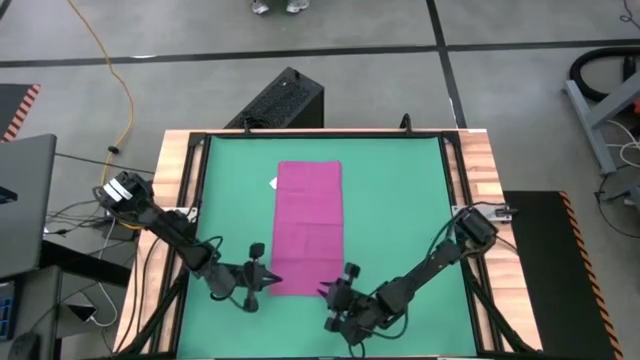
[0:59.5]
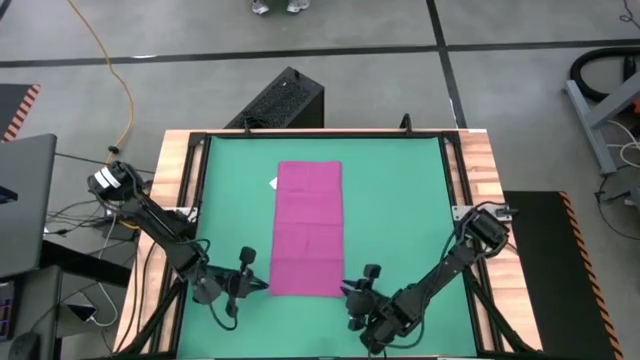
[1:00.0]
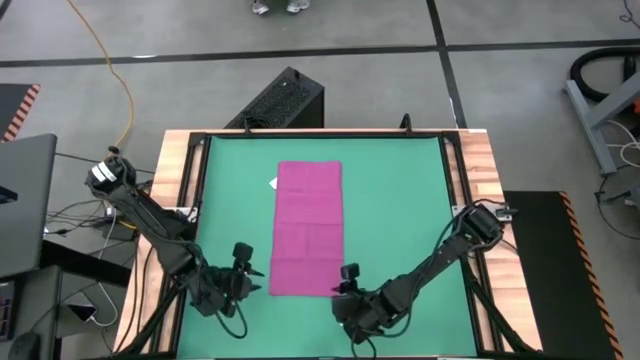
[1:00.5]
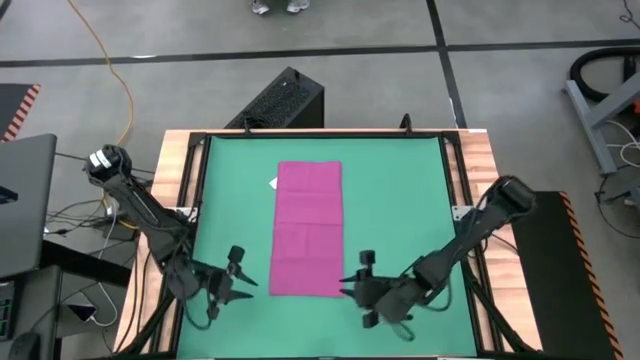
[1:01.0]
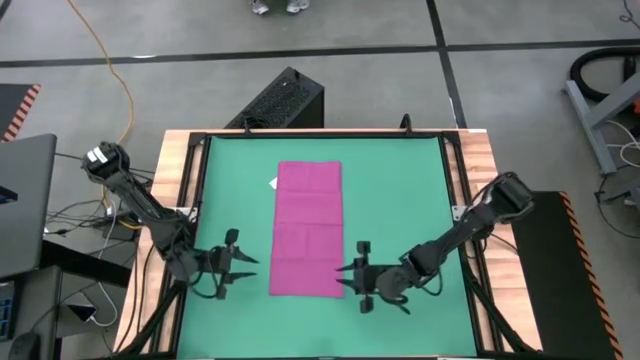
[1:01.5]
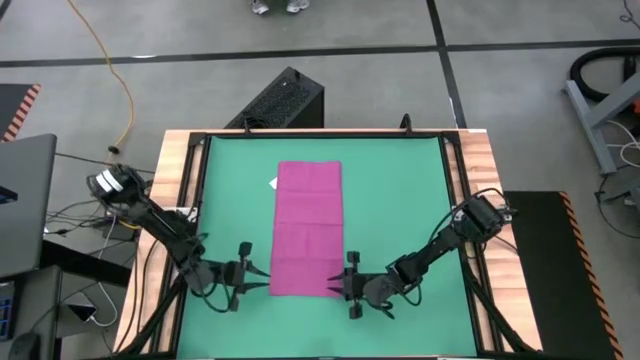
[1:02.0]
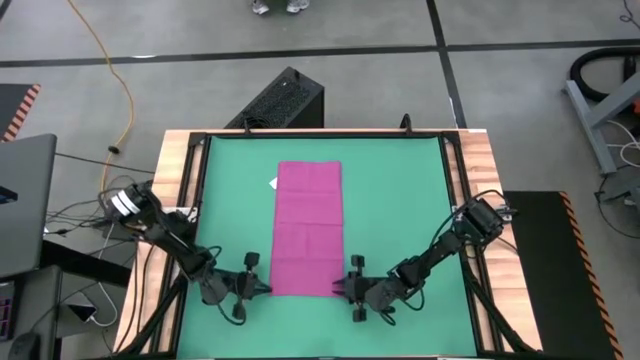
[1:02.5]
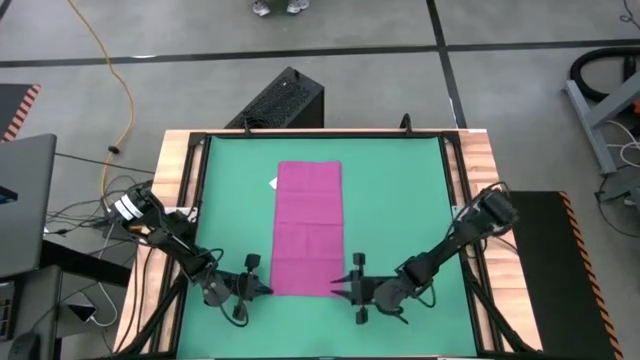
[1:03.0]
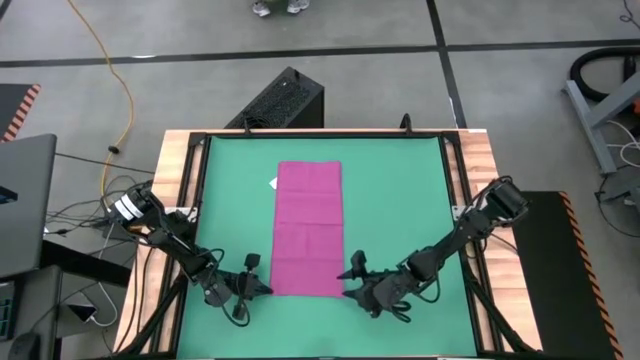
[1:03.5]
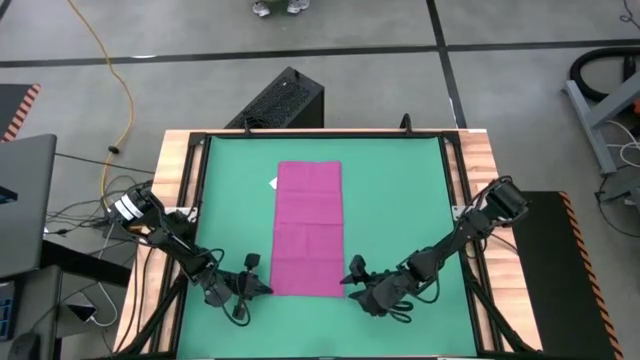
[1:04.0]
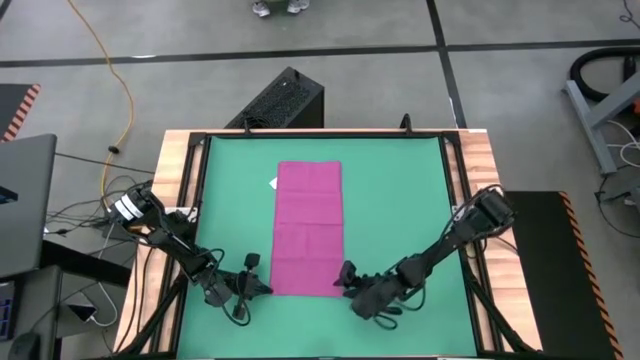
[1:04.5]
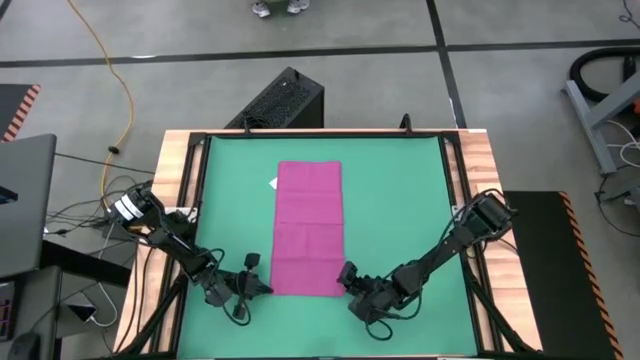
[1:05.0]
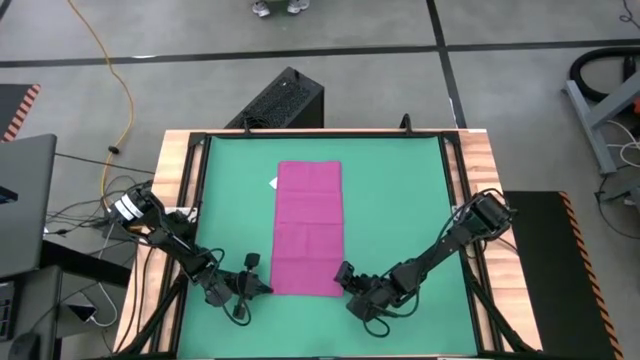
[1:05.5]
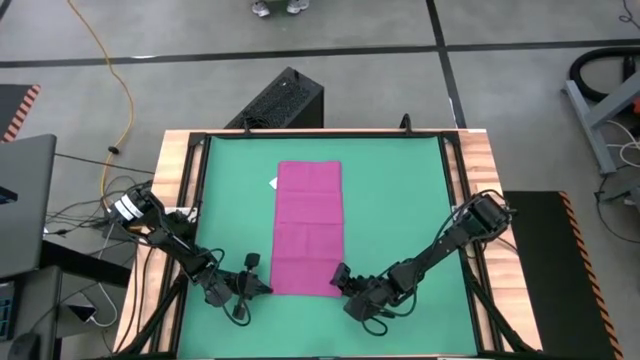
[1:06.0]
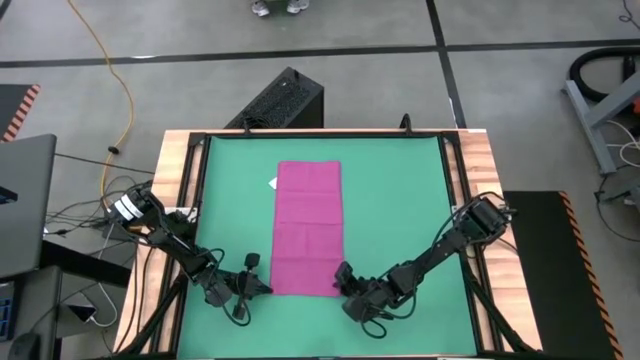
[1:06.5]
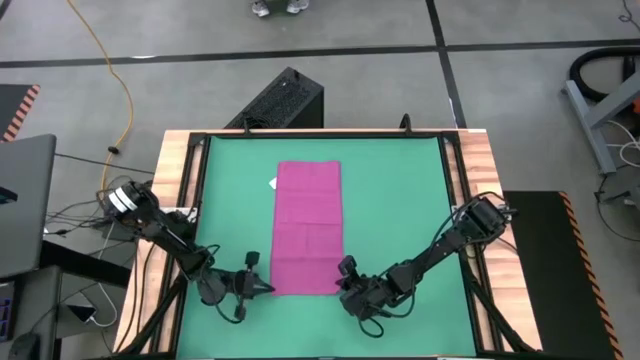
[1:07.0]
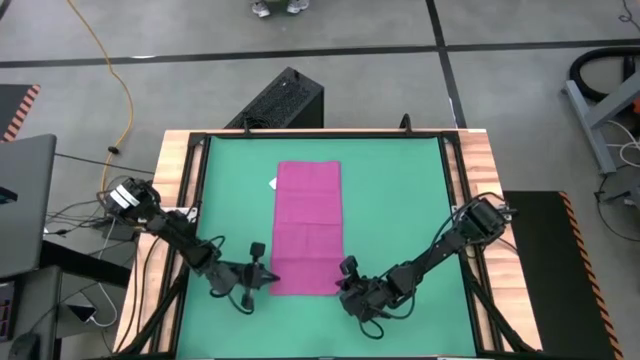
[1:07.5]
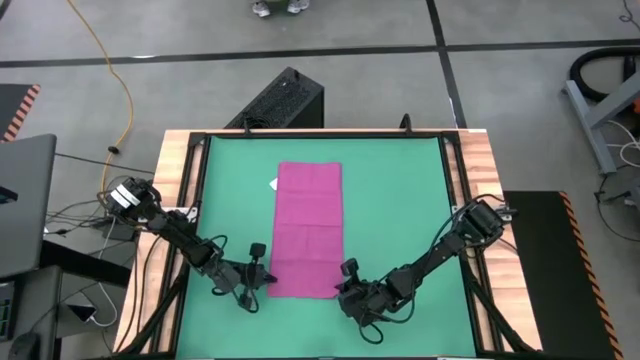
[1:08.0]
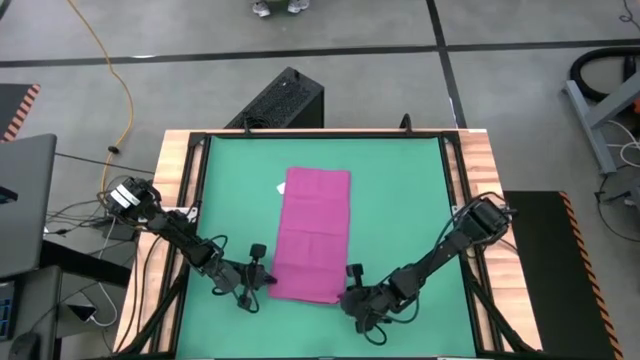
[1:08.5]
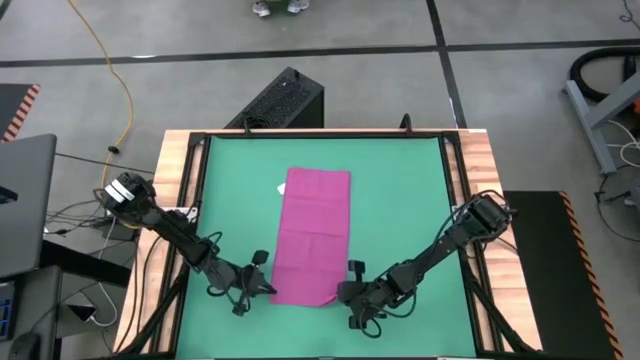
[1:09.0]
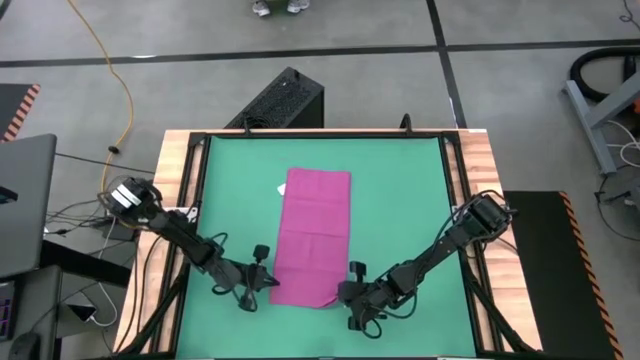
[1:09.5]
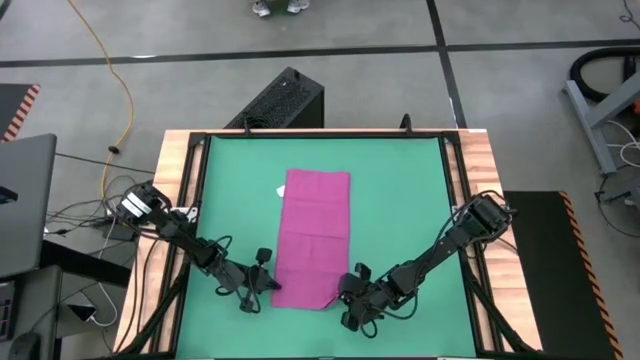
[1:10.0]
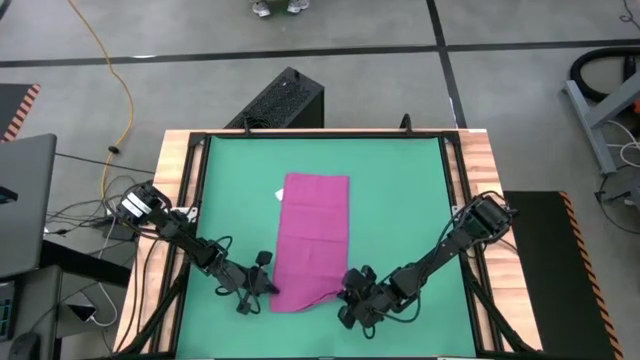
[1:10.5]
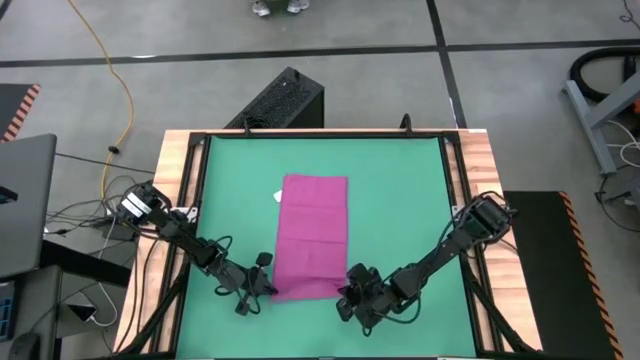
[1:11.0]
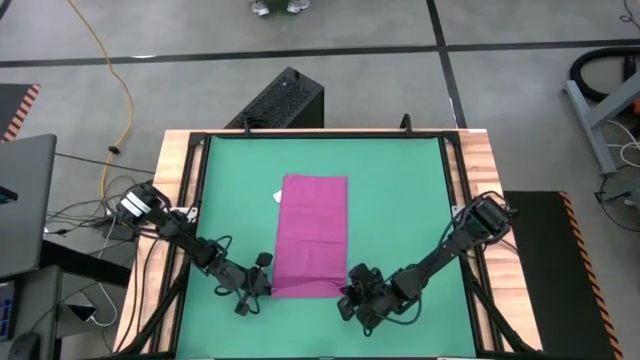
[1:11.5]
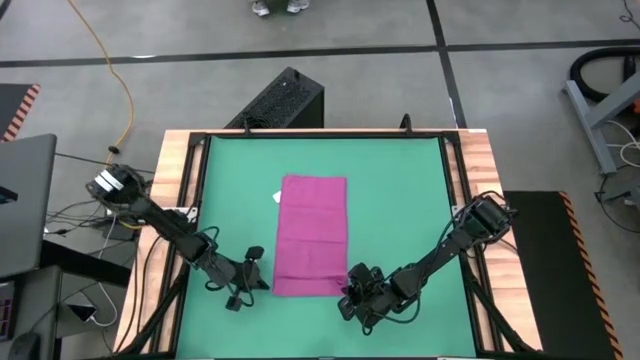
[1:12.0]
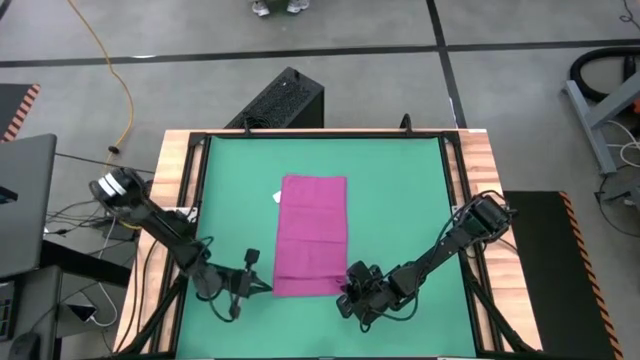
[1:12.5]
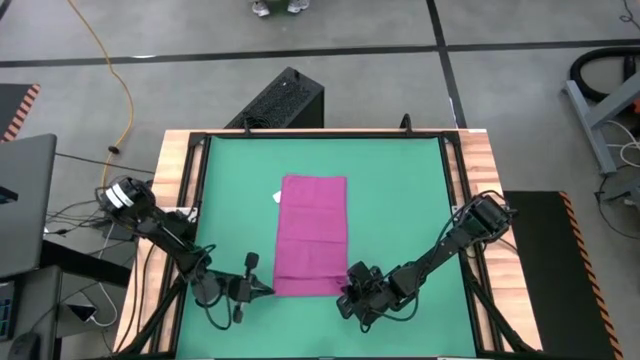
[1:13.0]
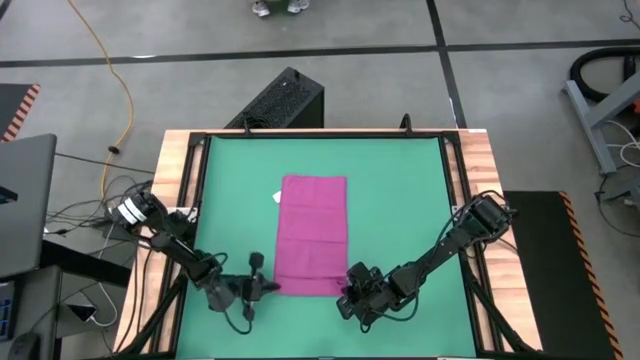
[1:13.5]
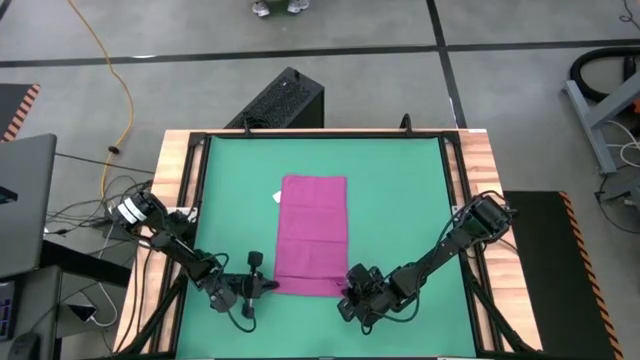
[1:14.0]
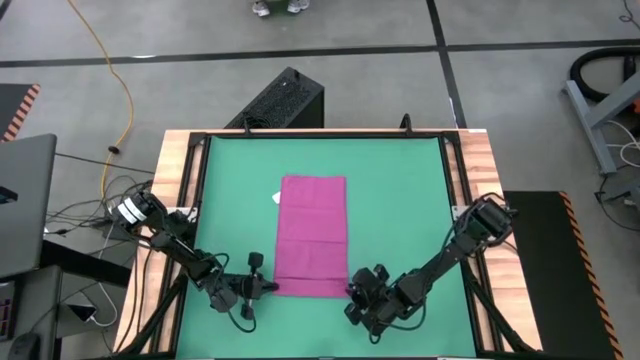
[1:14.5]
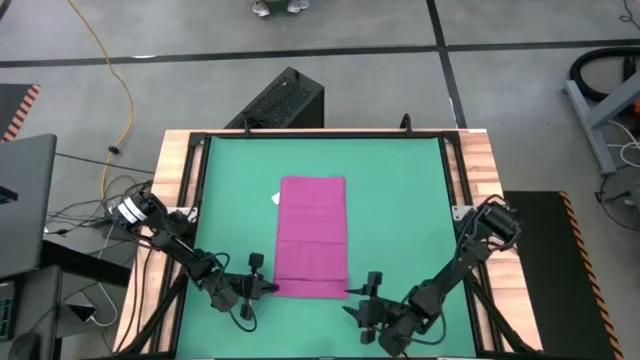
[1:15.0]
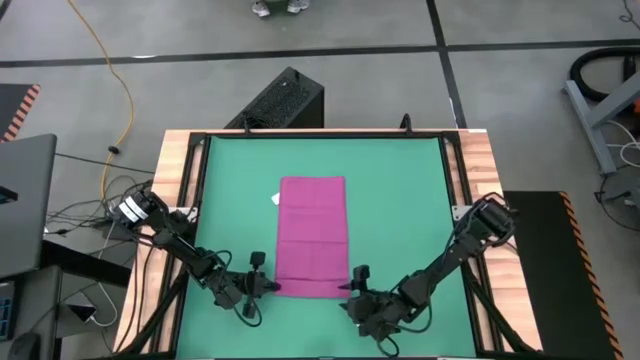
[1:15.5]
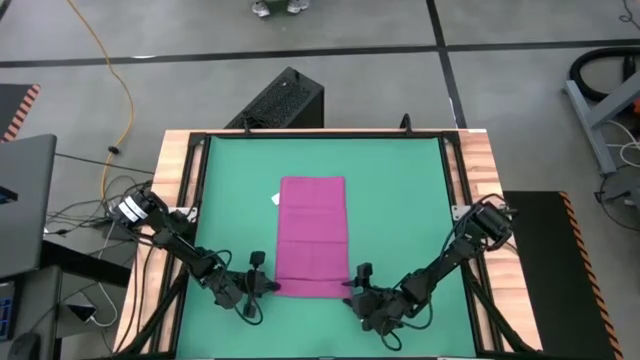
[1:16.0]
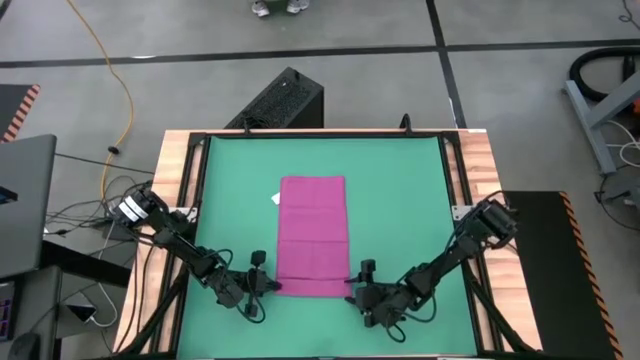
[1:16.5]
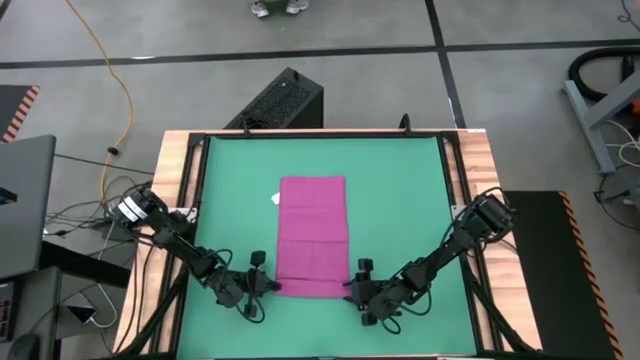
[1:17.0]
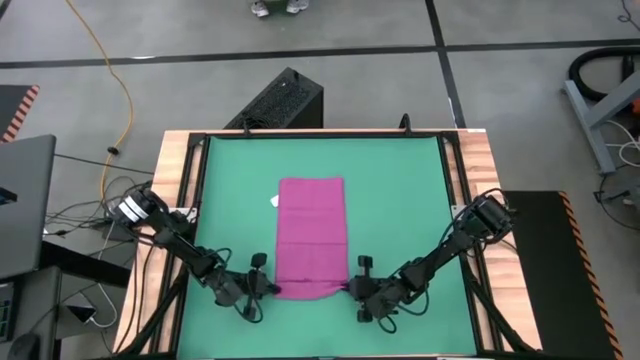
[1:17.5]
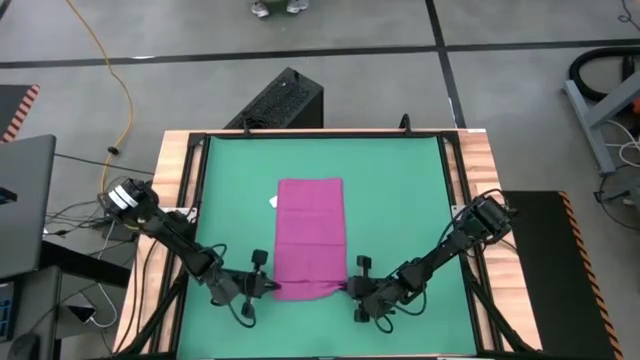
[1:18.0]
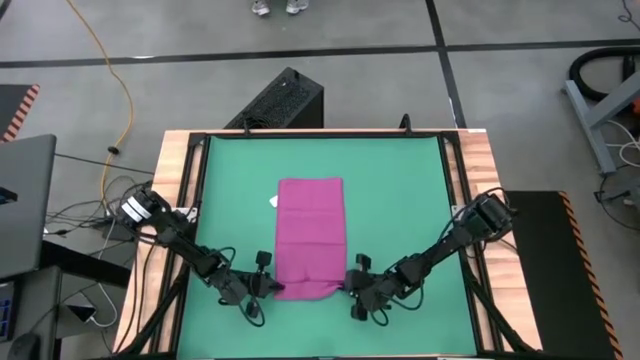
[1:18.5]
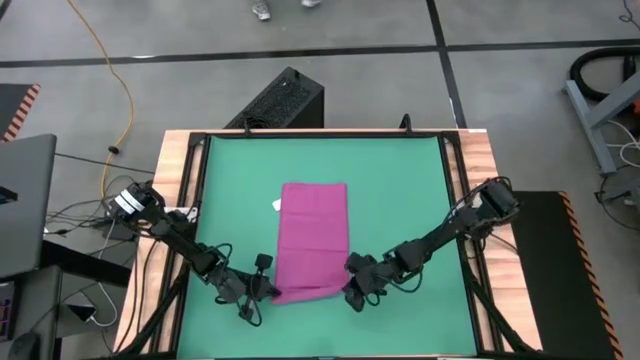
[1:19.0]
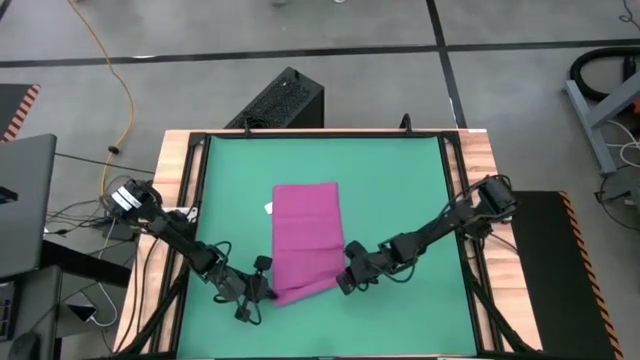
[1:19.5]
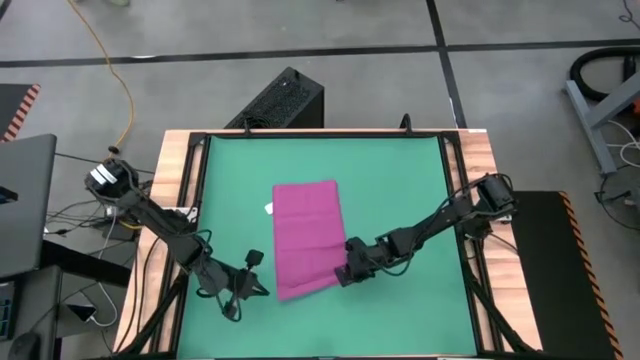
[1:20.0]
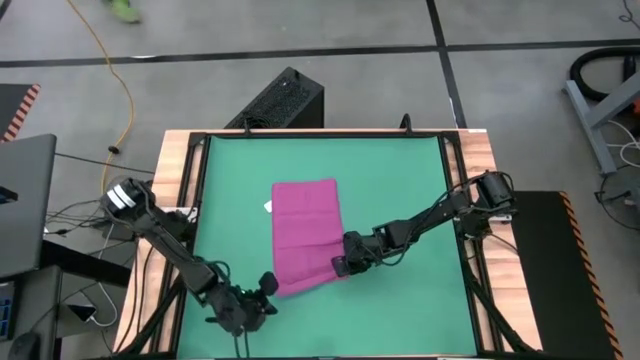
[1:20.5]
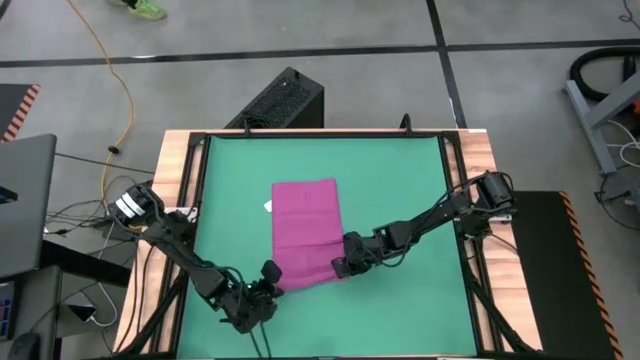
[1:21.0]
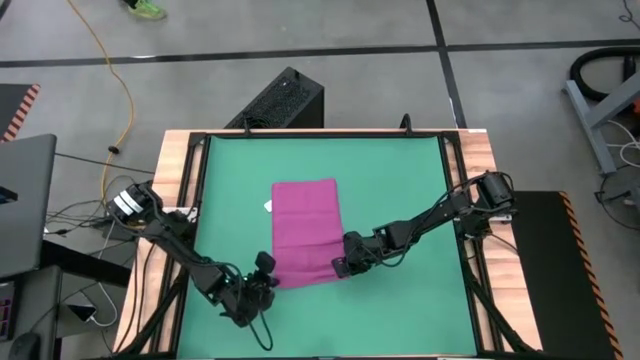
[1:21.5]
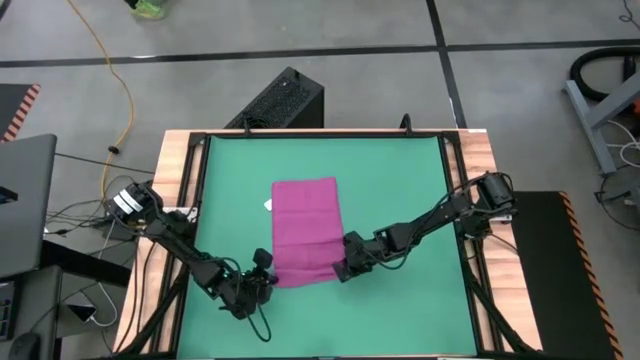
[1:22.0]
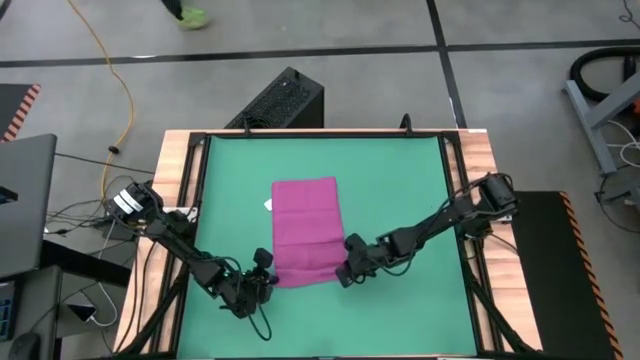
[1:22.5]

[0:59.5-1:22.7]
Task: Roll towel into tight, uniform cylinder
Roll the pink towel
